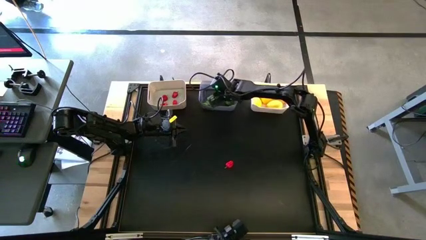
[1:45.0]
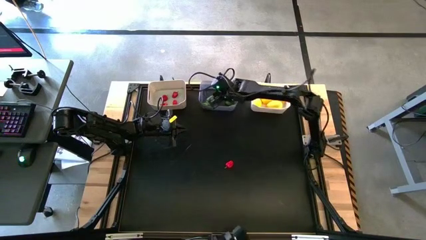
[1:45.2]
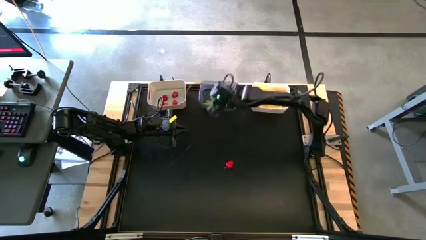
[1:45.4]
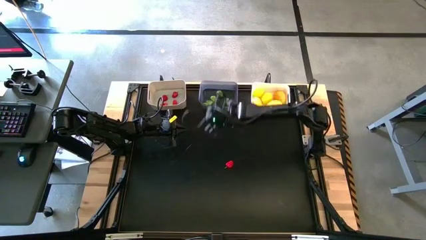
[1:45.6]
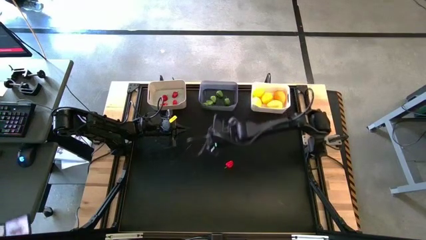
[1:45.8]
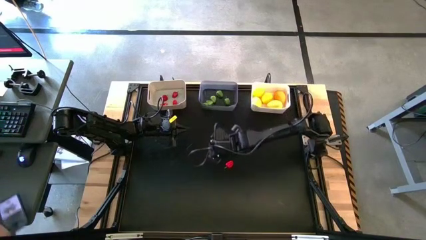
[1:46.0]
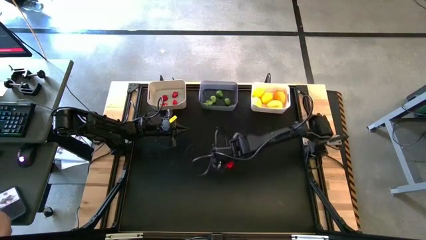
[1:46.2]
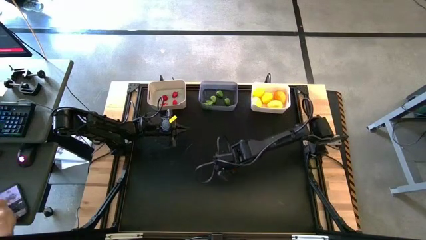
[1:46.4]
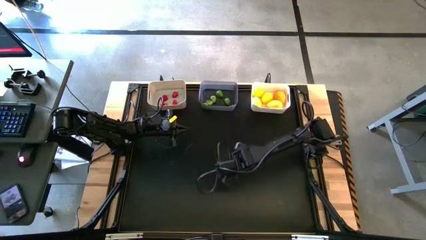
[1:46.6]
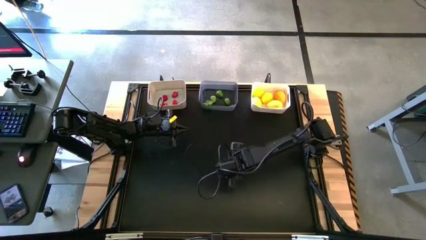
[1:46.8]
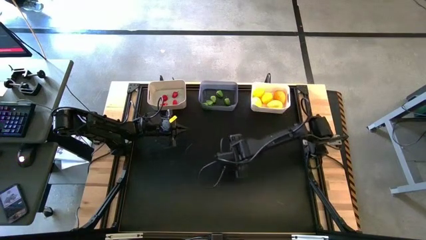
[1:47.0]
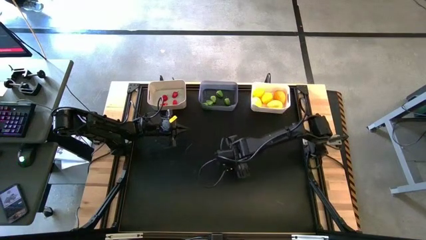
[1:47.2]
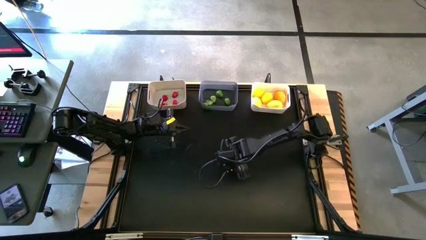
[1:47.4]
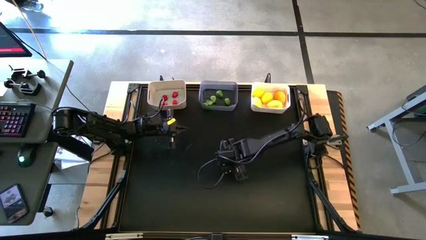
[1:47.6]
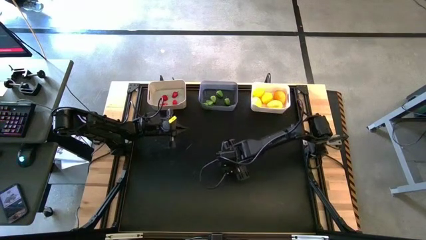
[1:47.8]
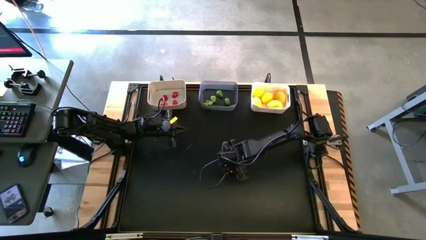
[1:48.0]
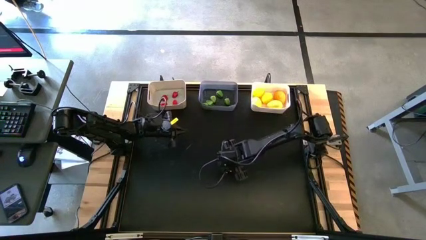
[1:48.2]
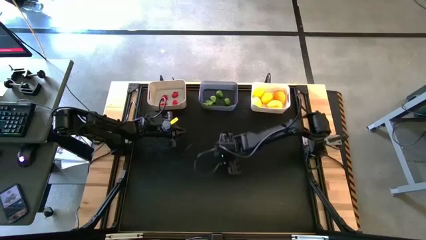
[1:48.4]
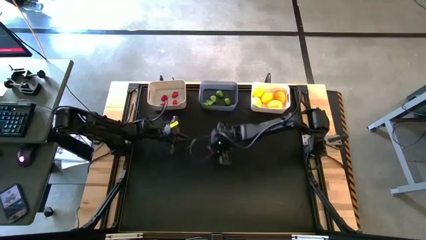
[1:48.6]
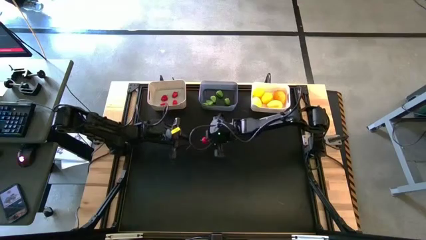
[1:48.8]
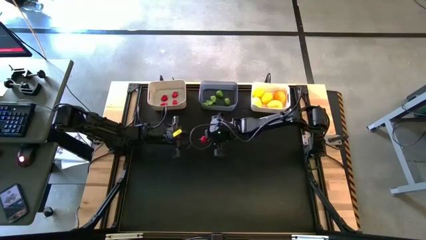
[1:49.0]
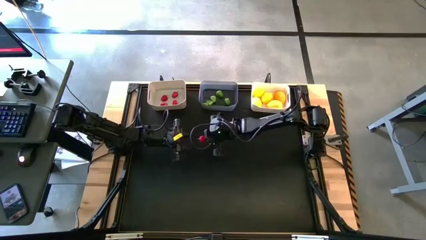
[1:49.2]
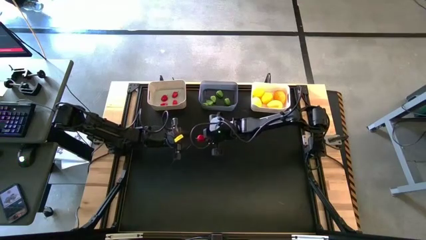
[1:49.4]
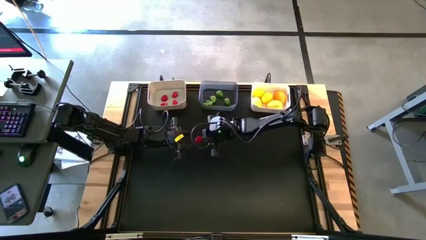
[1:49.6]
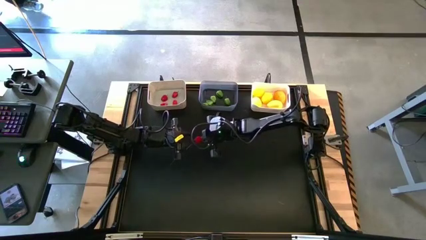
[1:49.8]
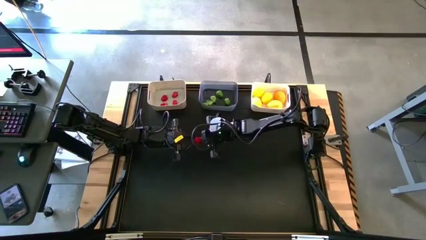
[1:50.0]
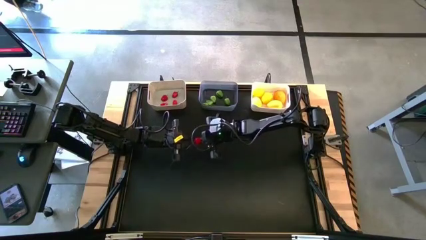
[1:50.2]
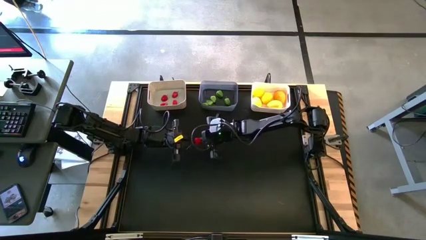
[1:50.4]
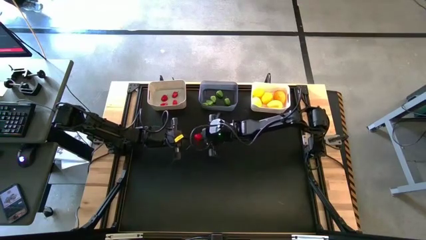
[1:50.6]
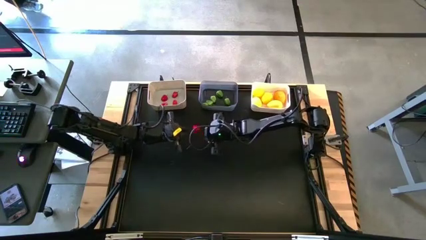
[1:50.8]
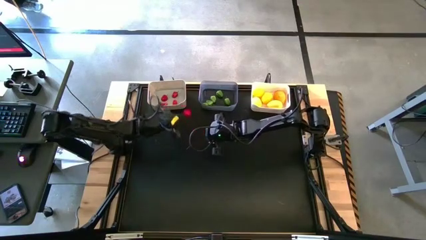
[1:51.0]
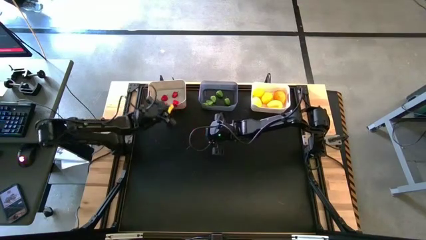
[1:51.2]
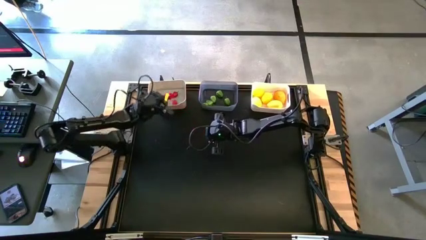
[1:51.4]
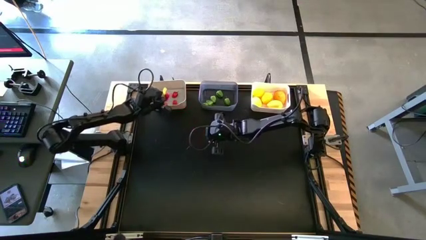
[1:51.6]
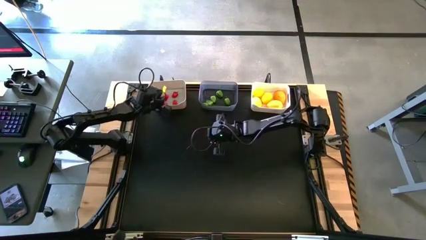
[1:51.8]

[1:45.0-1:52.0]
Task: Sort produce into baskets
Put the red bell pepper into the gray bin

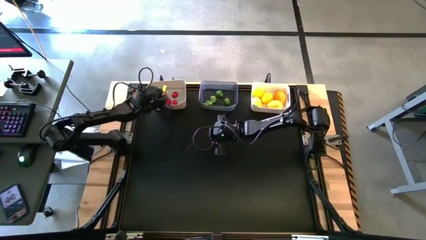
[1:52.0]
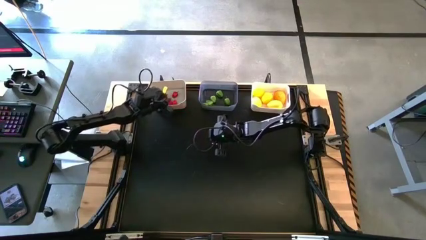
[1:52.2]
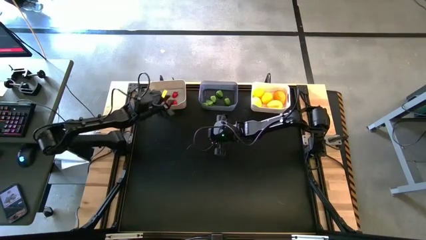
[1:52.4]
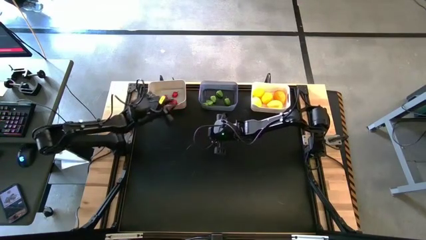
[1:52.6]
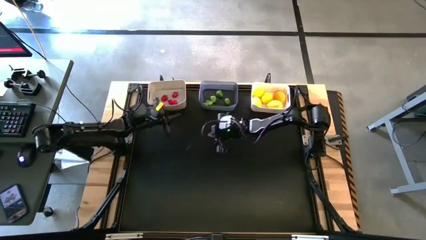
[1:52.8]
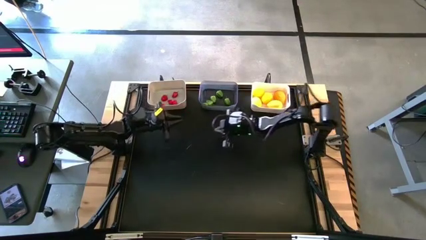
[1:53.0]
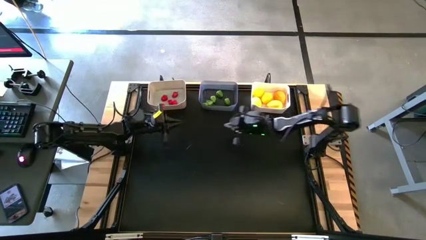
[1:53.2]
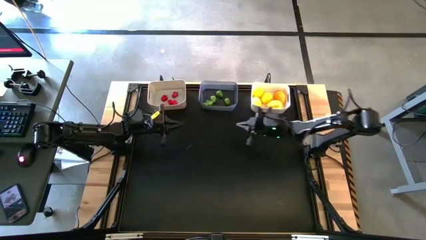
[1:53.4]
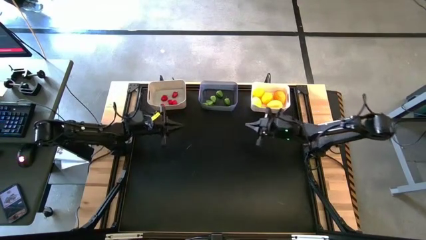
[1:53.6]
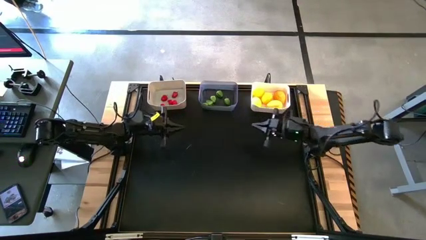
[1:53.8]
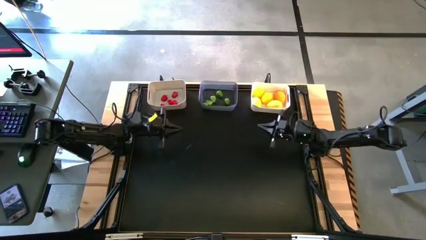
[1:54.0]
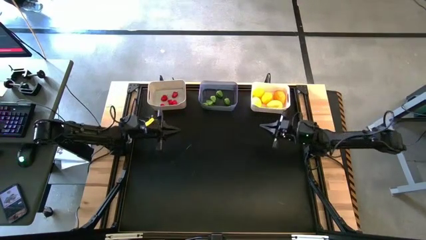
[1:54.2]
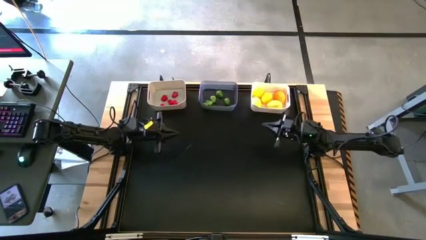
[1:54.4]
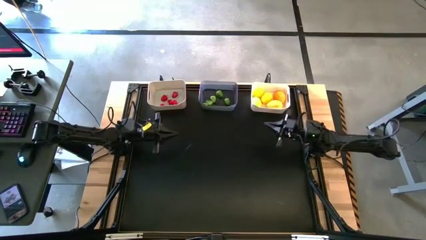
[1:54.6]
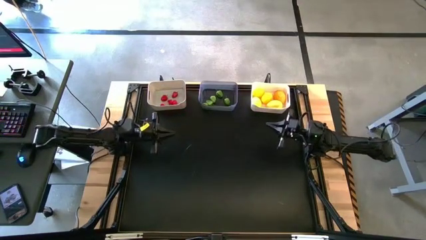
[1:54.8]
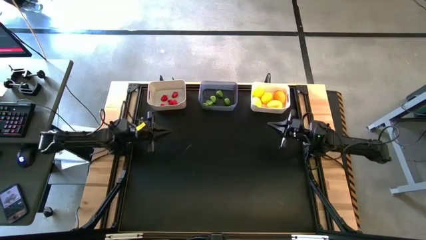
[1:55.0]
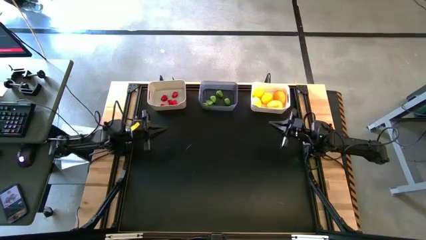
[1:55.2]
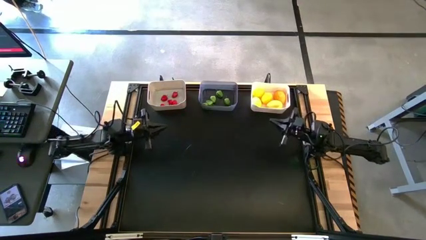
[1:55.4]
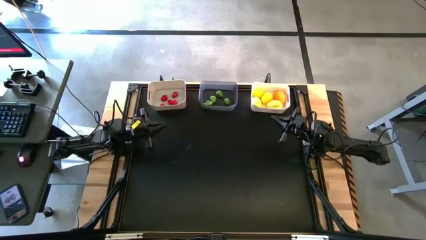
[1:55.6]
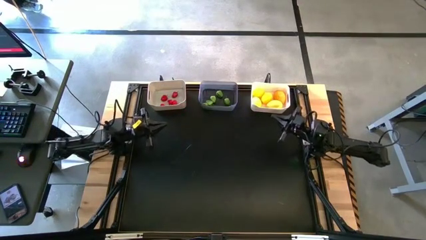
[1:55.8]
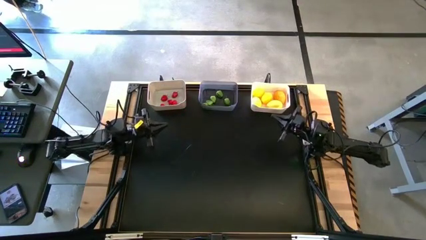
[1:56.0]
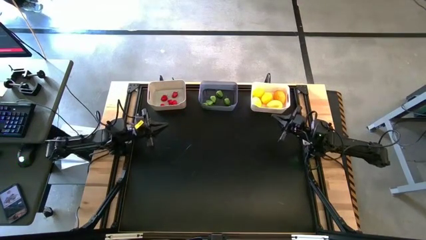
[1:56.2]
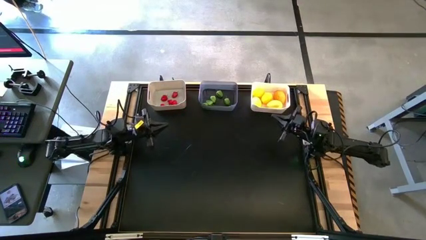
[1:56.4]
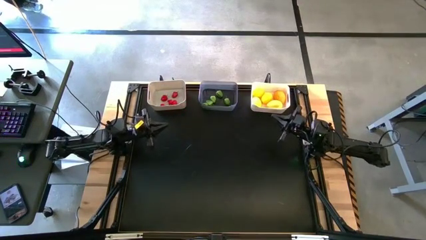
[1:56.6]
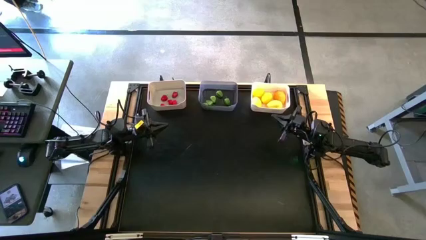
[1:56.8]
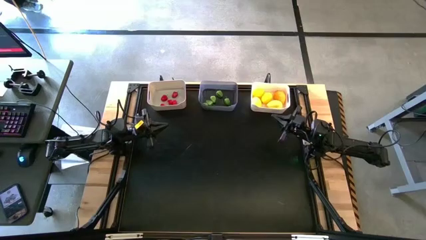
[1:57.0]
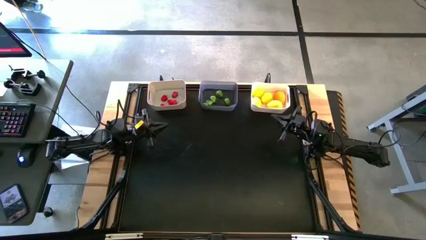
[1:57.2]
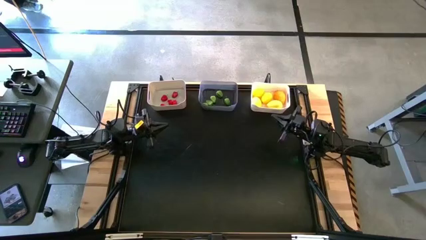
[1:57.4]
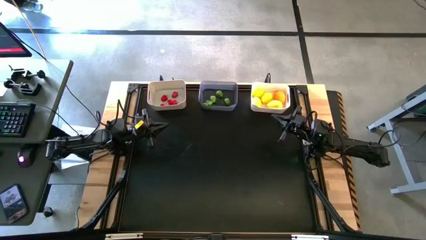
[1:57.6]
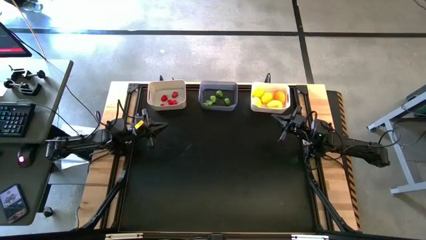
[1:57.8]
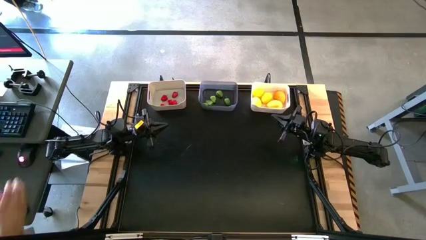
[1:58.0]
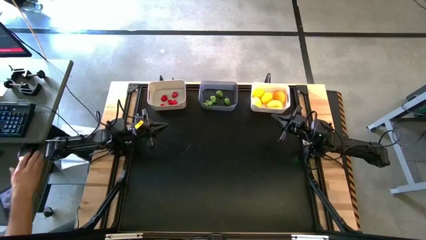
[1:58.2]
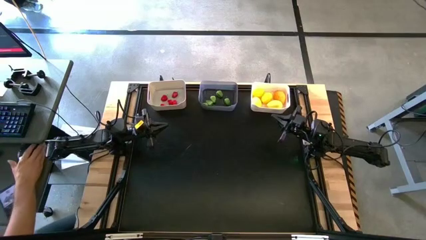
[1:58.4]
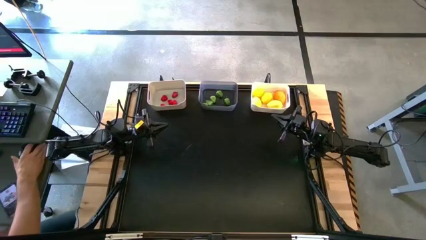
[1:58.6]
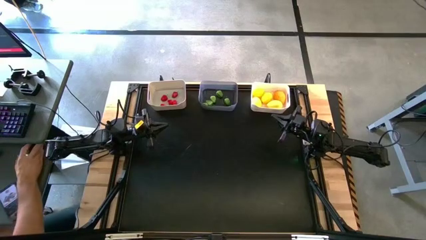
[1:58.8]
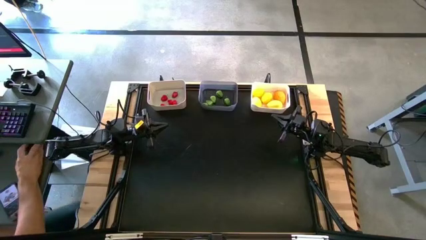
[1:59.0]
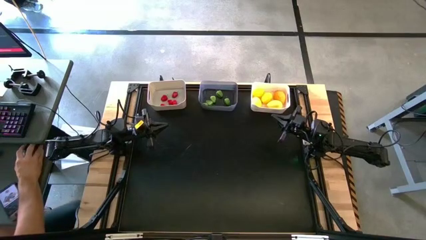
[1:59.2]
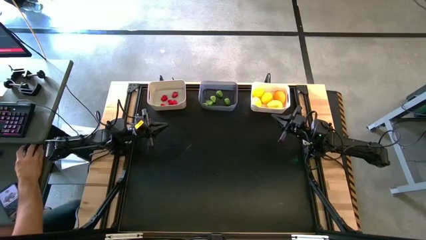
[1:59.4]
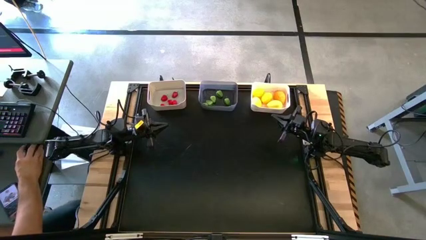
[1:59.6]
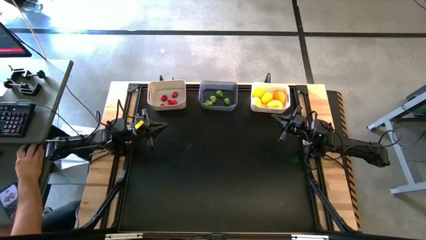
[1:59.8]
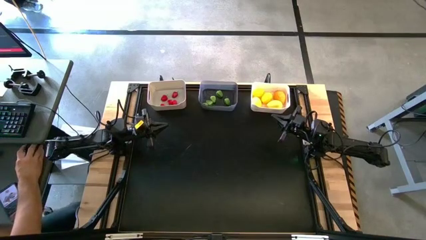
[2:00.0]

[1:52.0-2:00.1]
Return to Home Position

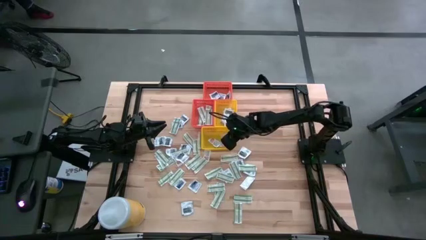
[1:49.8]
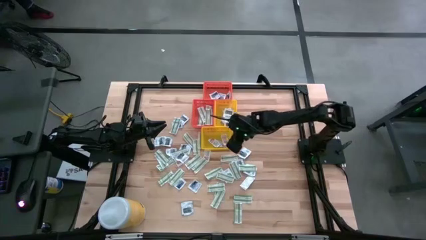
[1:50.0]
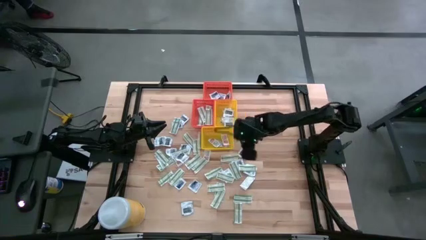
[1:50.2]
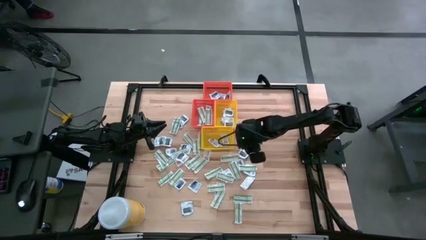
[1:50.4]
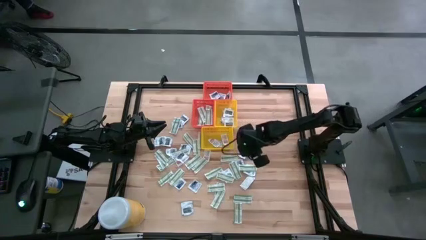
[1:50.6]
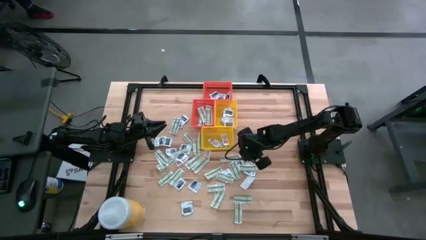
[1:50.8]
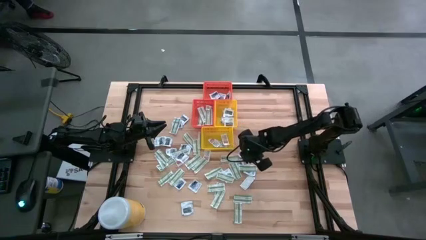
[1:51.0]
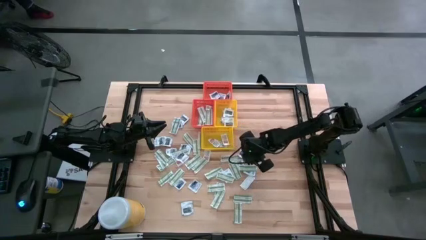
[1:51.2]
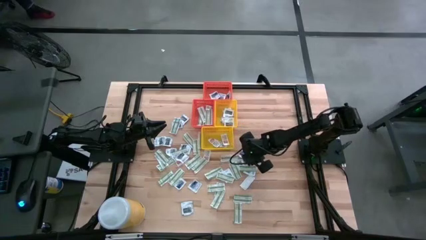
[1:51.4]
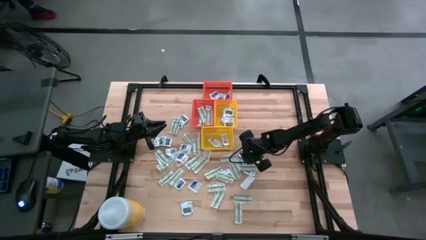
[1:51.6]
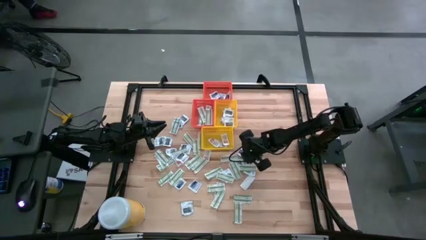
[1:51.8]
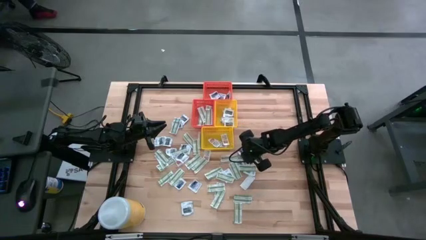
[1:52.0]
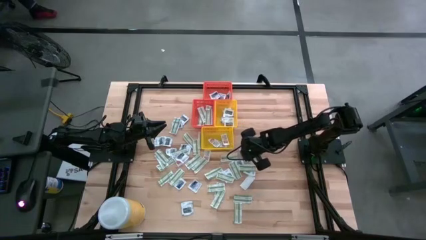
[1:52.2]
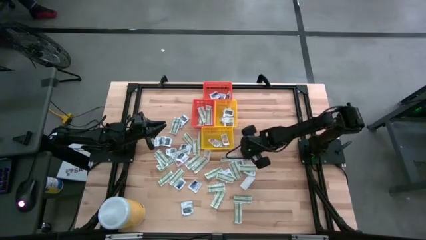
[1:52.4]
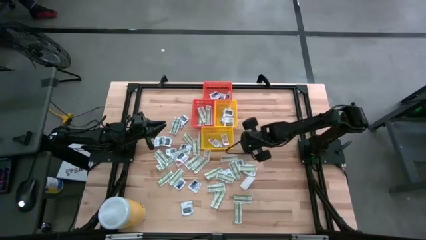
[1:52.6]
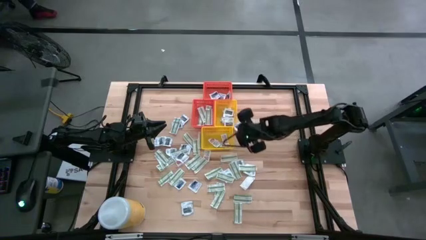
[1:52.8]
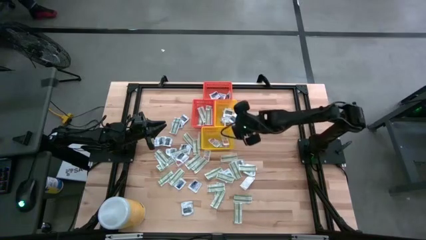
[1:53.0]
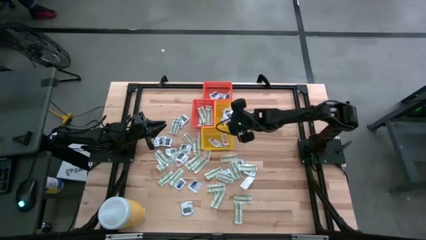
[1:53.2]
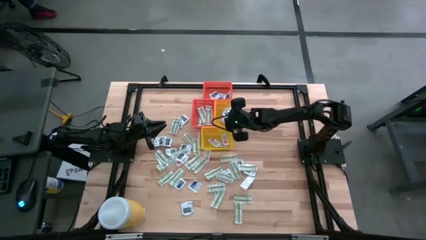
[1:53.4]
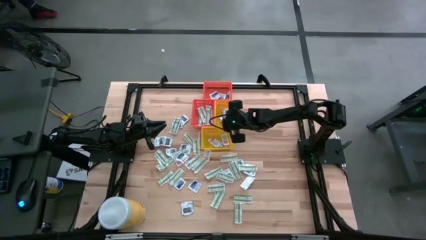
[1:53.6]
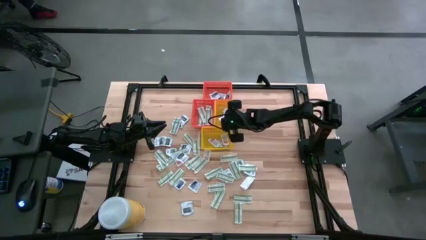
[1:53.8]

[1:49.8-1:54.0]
Task: Pick & Place First Aid Supplies
Put the towelette pack into the top yellow bin
